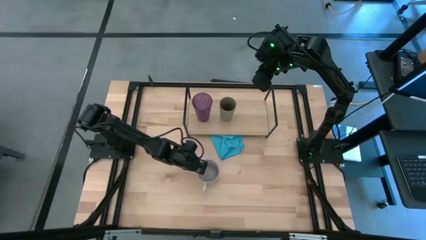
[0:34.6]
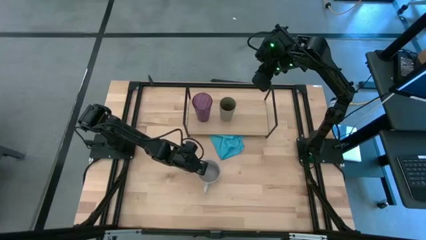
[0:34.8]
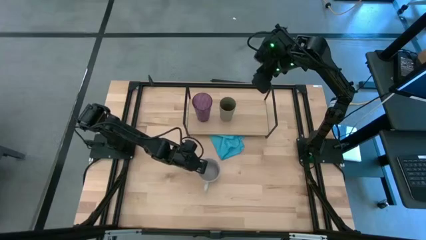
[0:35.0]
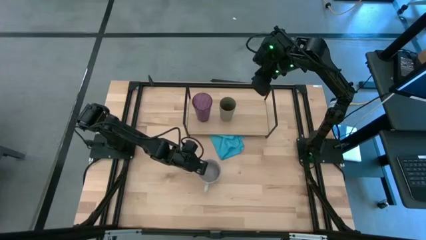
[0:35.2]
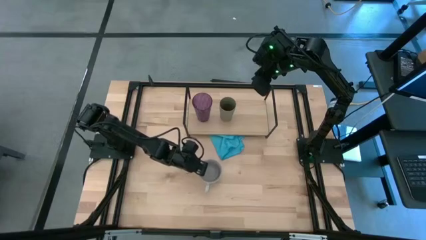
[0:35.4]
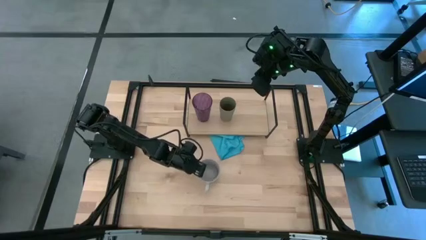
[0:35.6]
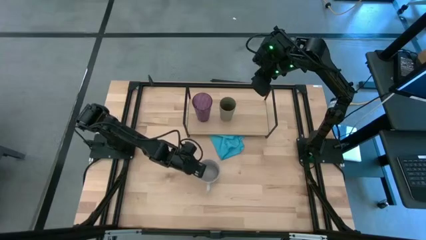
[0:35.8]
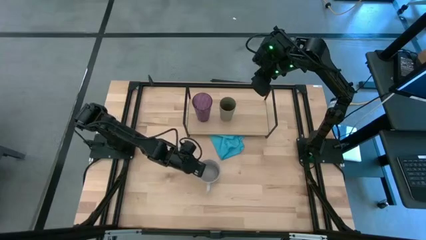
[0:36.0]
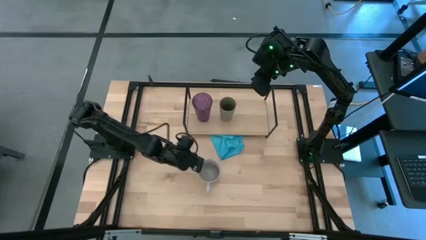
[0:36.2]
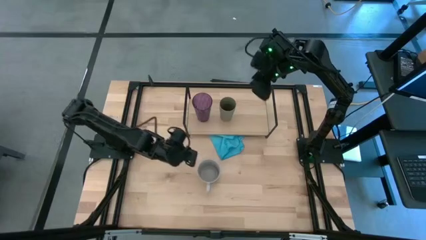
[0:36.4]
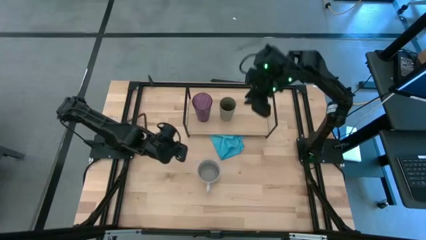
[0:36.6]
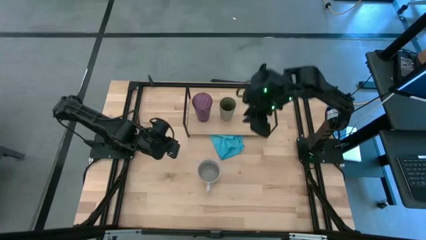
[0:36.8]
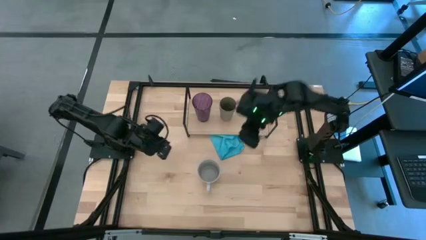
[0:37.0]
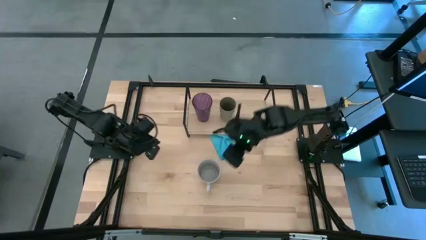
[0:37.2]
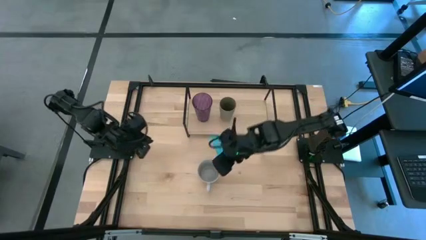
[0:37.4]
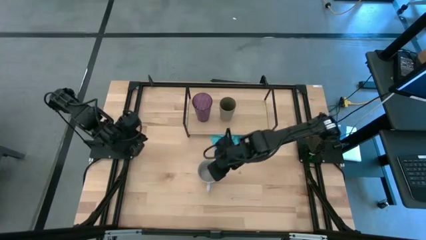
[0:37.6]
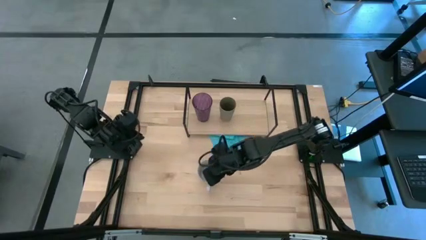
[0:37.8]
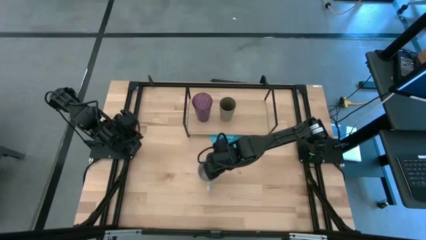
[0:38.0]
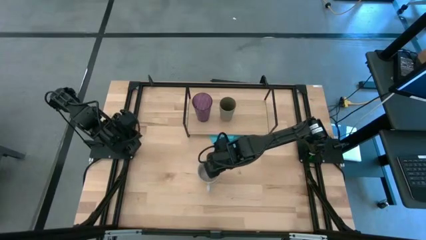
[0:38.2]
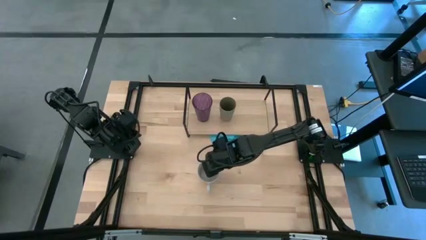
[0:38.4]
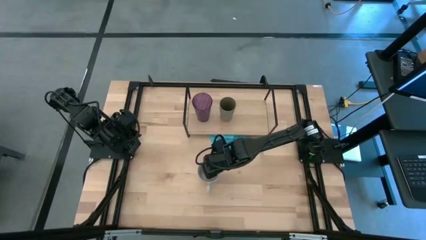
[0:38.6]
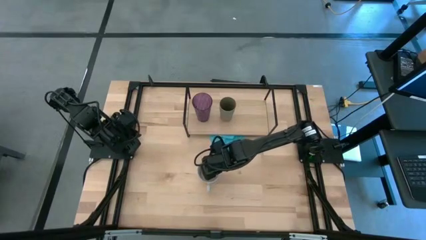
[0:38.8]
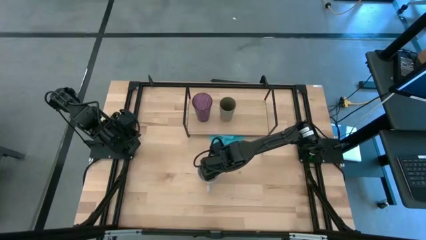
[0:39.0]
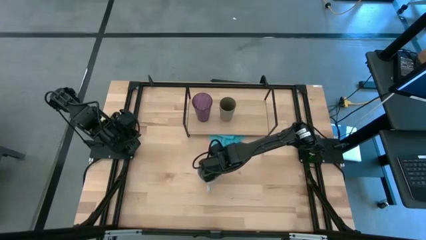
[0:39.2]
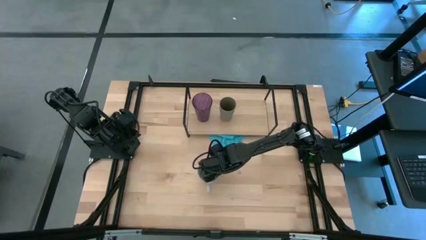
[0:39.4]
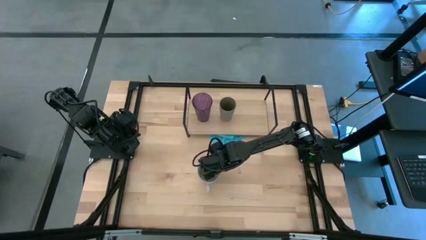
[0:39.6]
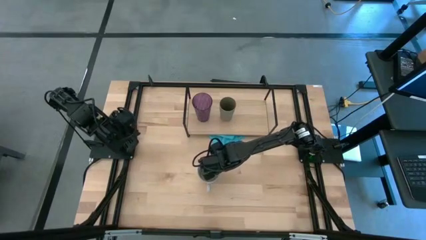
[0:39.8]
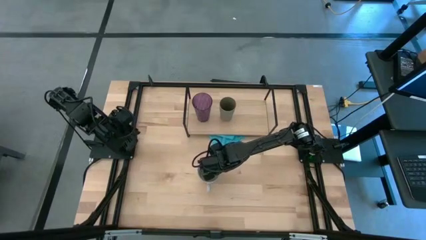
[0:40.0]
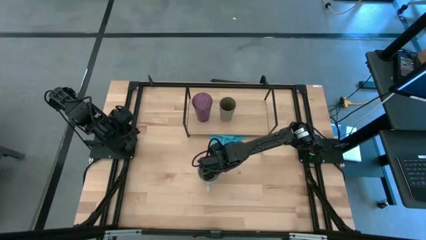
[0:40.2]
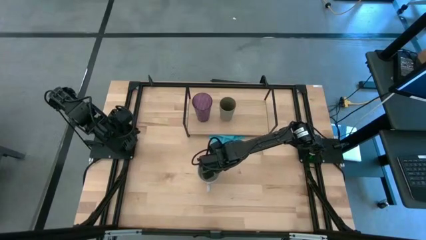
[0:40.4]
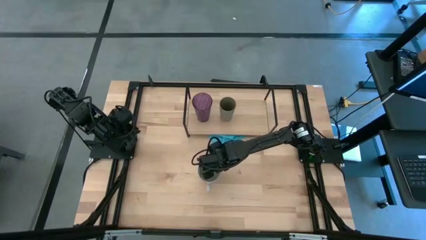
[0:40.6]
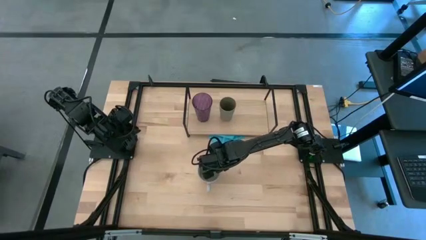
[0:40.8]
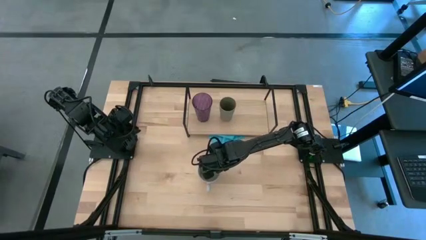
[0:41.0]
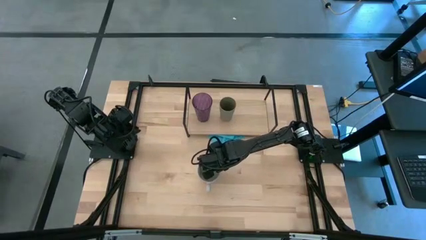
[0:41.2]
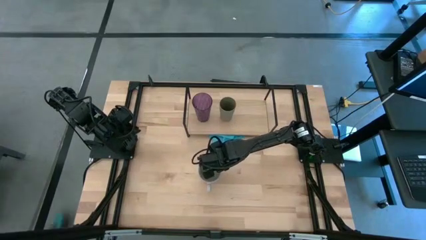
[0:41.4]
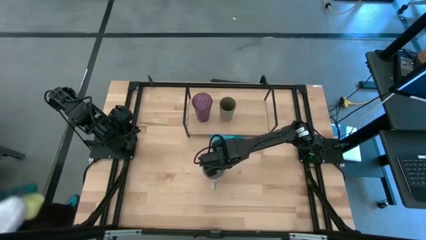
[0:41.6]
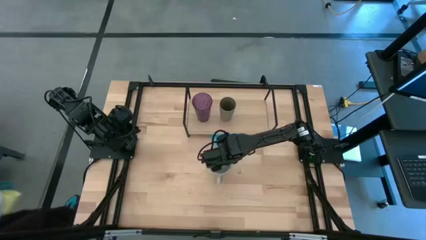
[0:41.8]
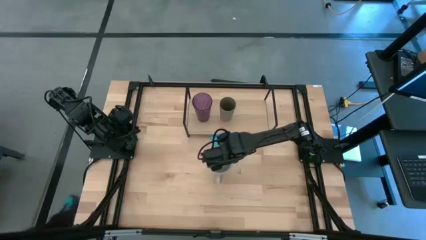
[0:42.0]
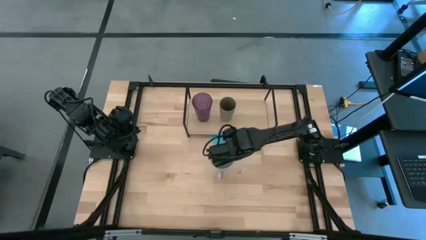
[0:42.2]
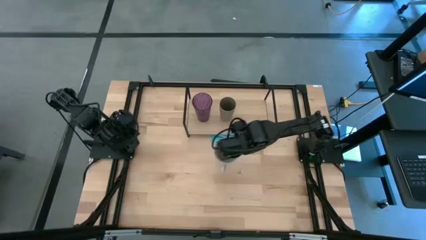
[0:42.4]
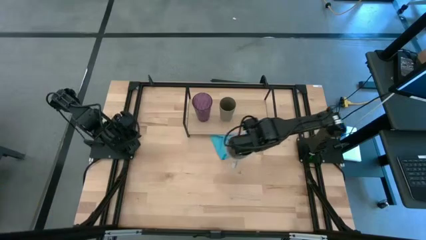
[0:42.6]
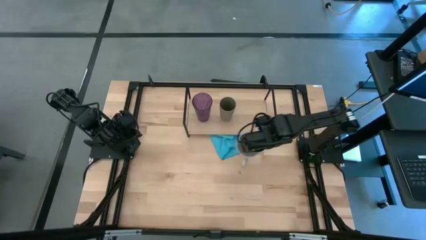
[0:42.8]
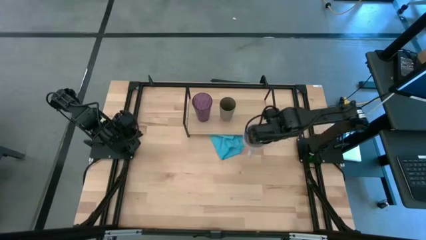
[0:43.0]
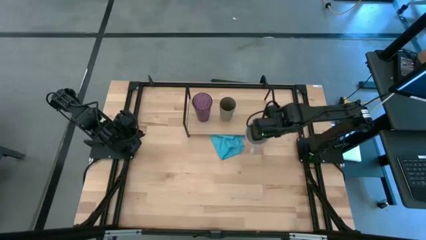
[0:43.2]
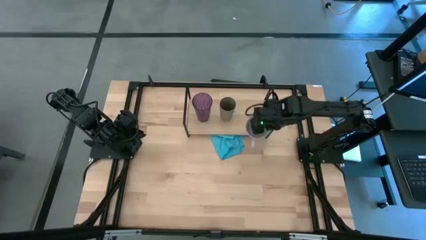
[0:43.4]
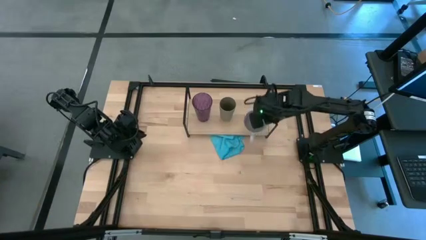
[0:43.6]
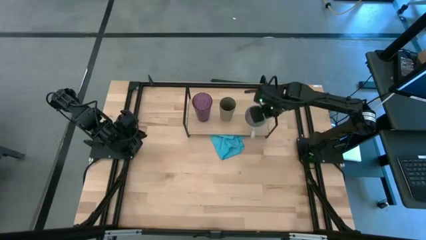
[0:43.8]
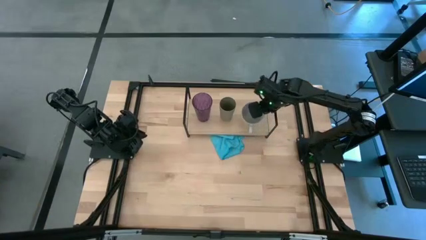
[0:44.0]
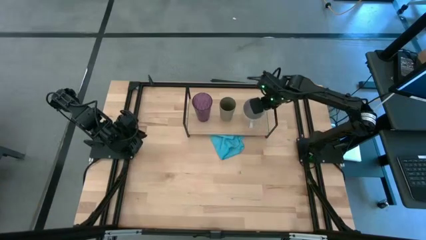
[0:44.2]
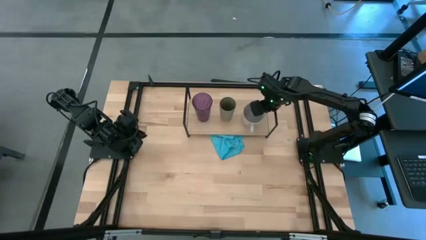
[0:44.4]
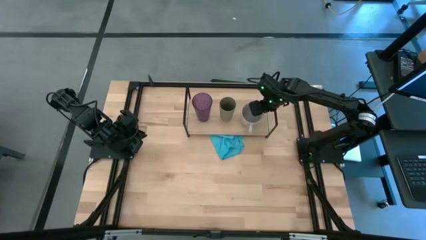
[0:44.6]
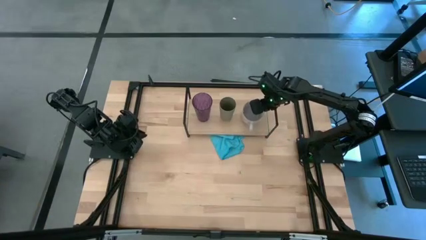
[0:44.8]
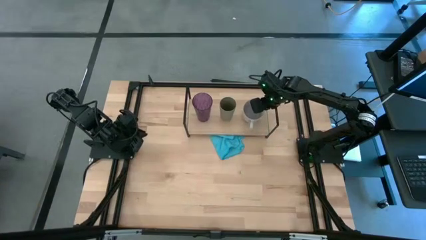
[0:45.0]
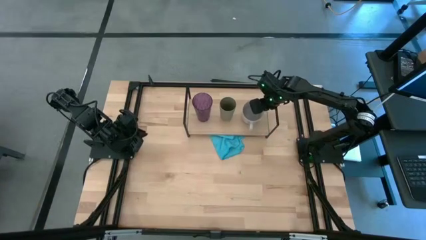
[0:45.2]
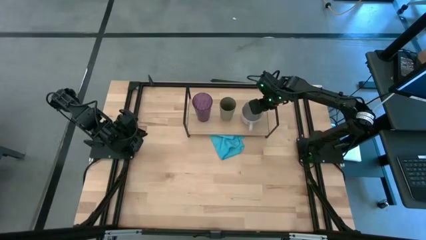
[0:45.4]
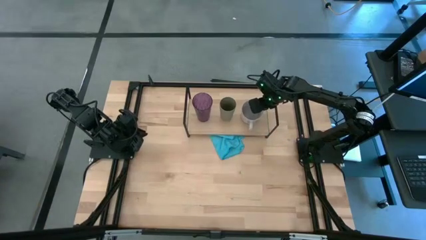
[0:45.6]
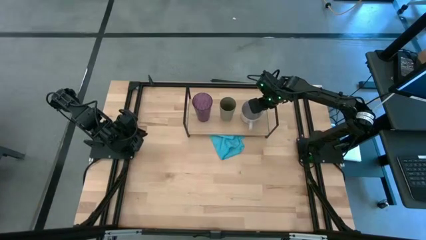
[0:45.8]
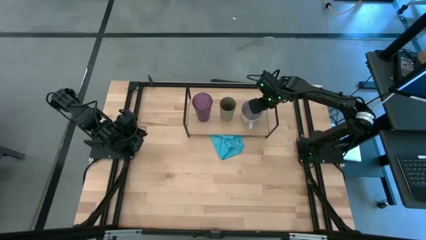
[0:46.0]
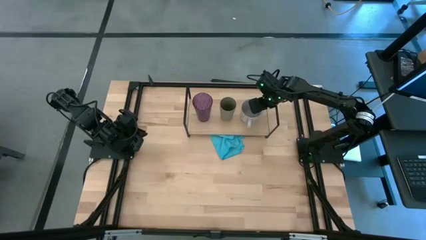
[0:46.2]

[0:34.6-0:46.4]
Task: Stack small to large cups/mugs on shelf
Put the gray patterned mug on the shelf

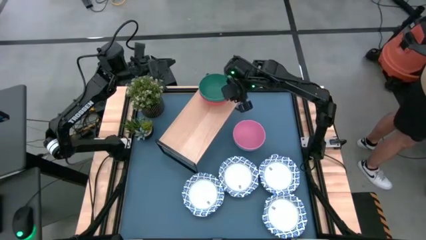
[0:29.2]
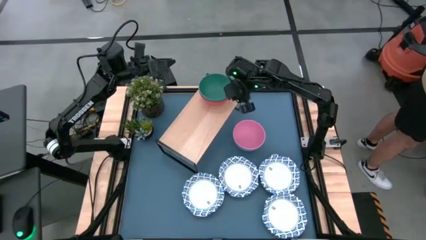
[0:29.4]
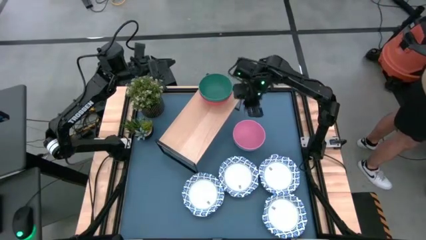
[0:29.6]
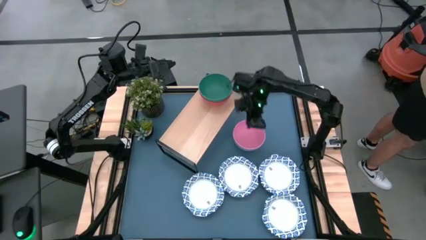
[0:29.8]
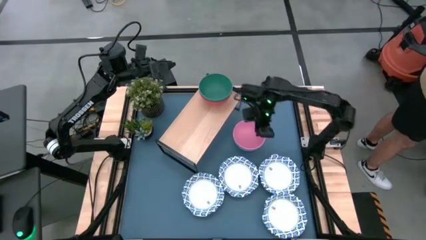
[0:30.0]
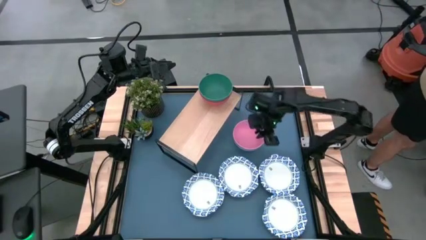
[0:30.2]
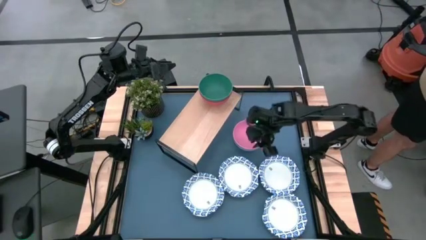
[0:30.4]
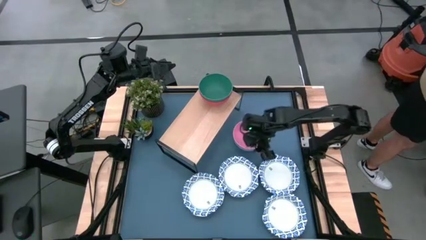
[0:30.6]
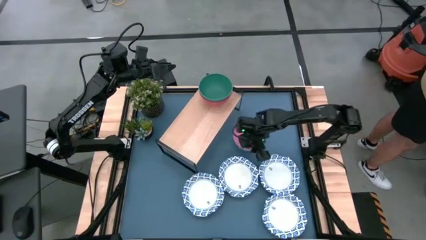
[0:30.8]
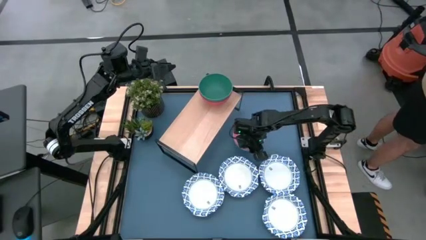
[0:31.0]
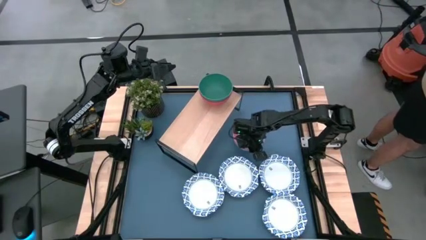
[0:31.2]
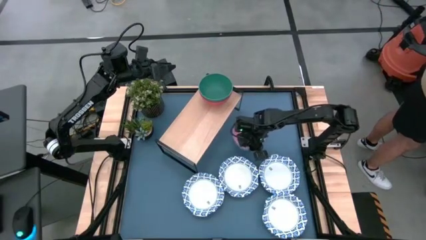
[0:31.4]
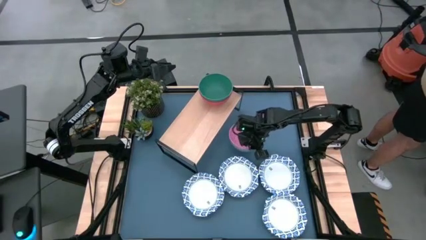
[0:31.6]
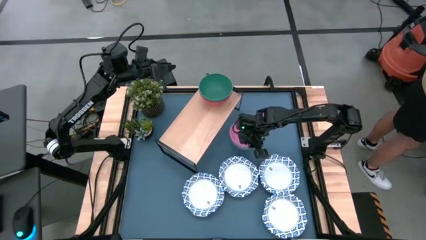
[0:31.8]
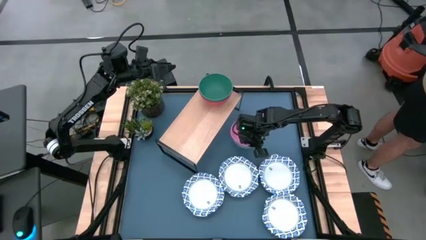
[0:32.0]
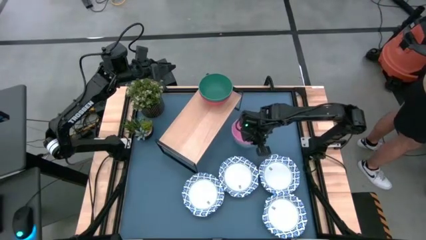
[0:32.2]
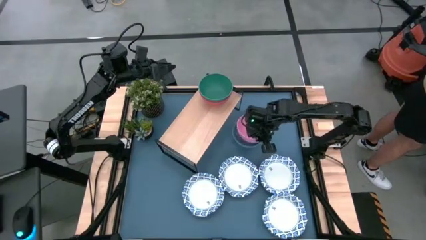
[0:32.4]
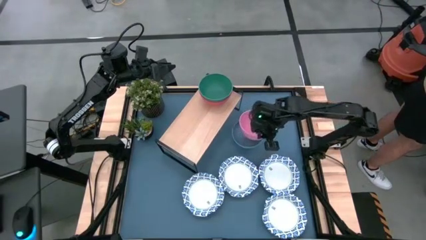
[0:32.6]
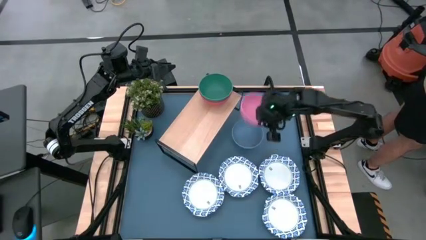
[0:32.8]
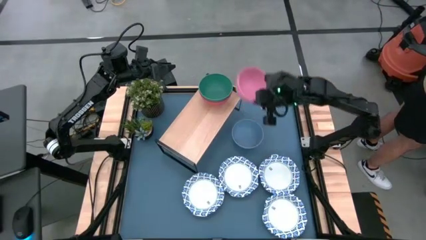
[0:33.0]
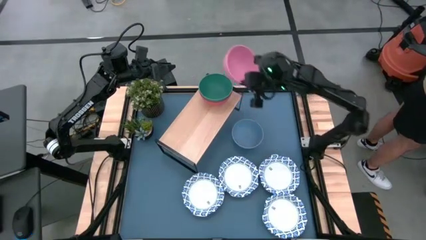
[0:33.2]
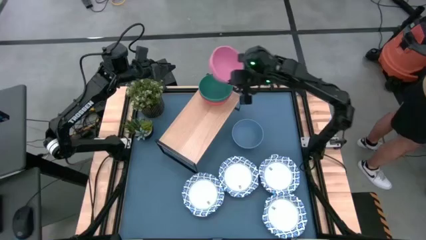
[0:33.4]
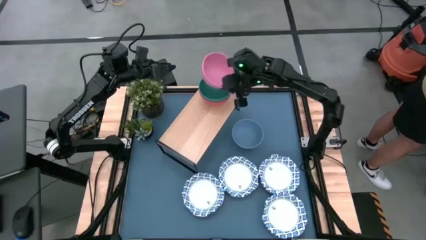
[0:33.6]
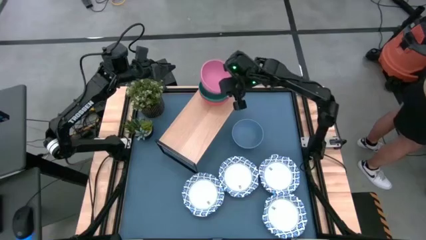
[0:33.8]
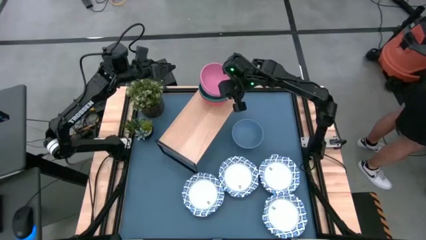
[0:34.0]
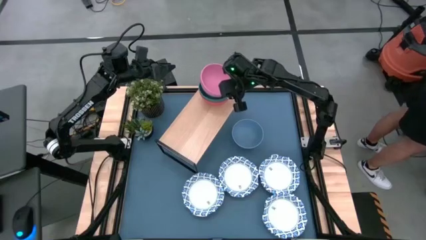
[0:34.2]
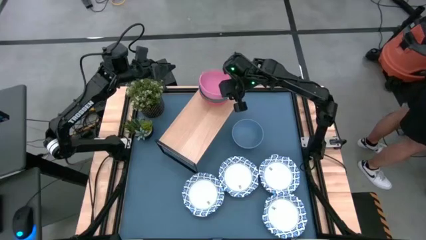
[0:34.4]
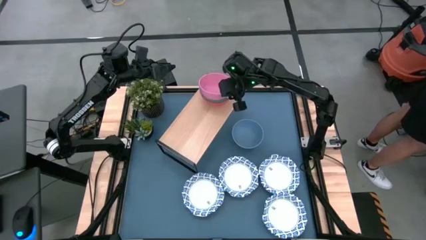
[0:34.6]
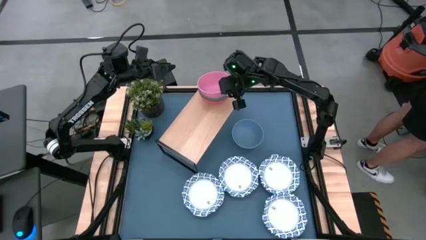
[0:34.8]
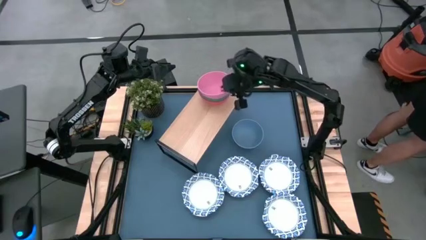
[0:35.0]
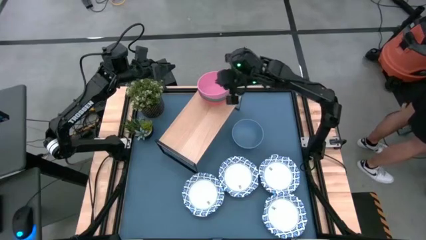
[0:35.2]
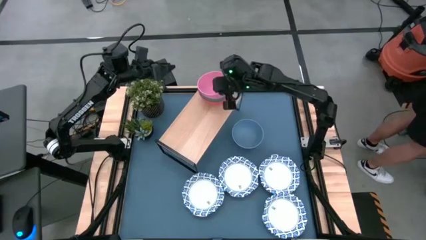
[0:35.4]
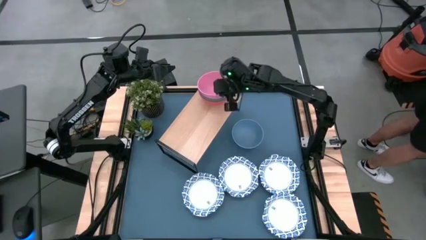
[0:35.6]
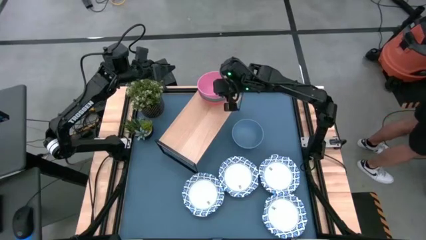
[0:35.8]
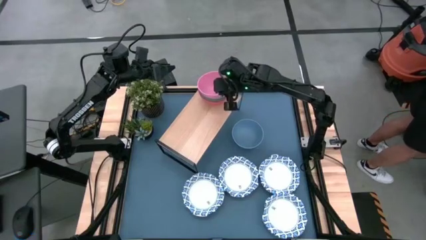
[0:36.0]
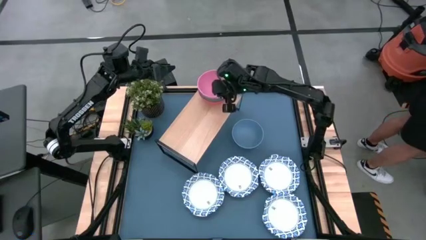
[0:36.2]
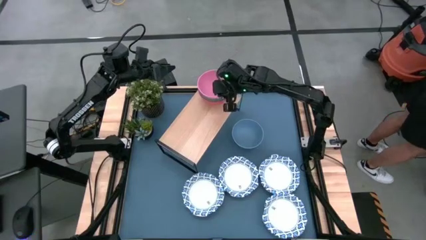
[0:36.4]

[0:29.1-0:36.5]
Task: Place and stack bowls onto a shelf
Stack the pink bowl on top of the green bowl on the shelf
